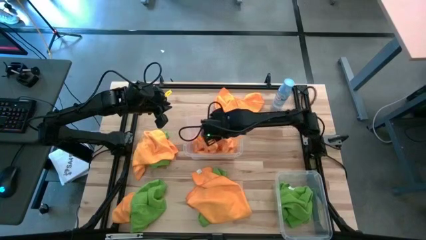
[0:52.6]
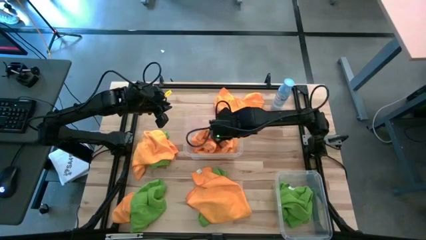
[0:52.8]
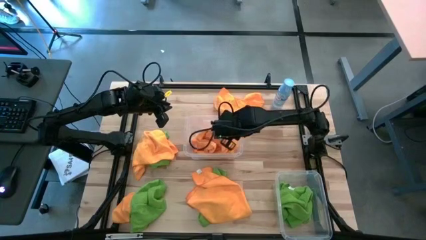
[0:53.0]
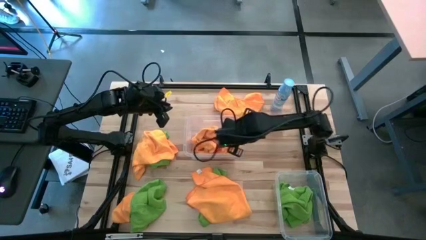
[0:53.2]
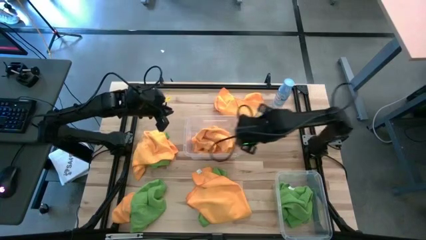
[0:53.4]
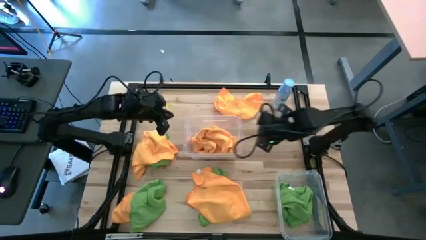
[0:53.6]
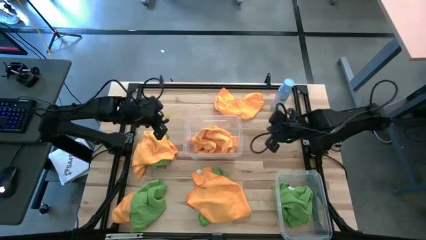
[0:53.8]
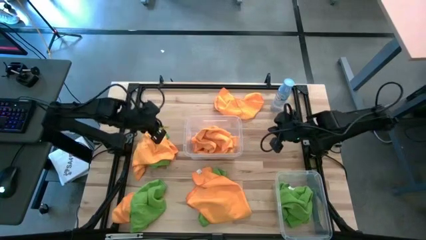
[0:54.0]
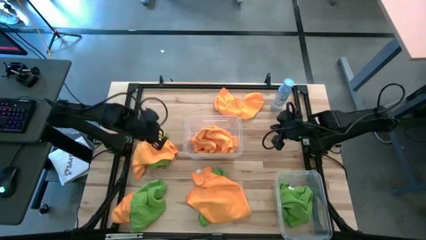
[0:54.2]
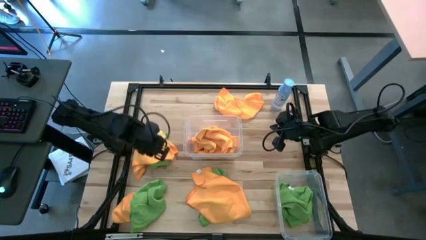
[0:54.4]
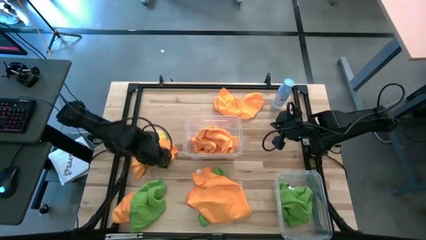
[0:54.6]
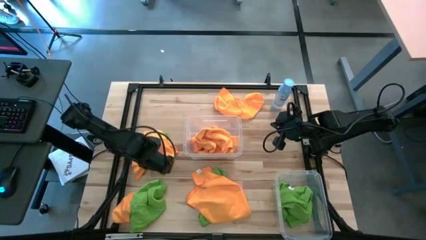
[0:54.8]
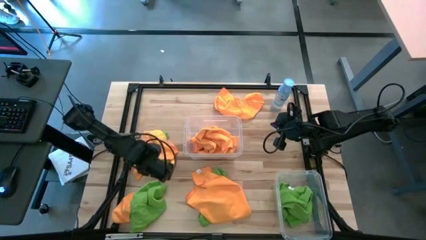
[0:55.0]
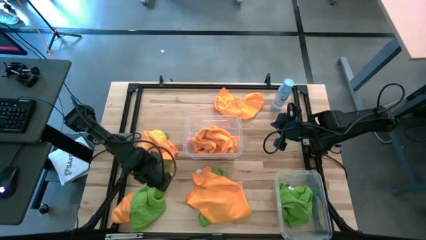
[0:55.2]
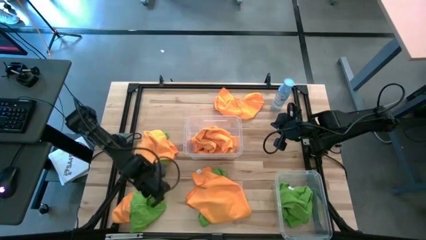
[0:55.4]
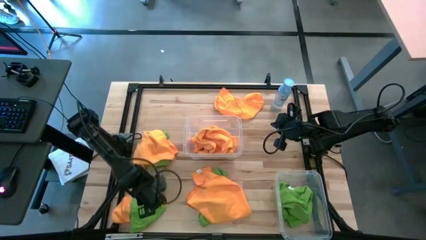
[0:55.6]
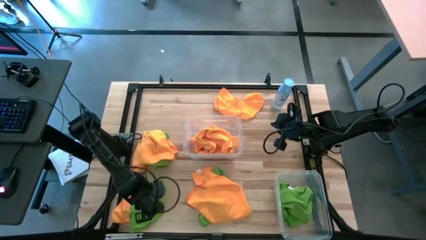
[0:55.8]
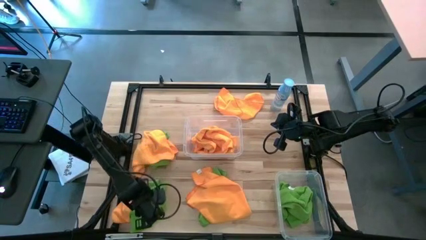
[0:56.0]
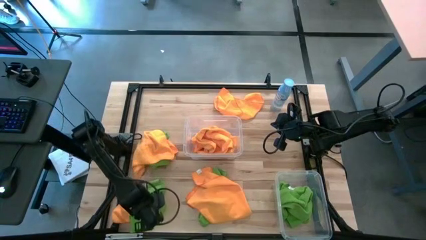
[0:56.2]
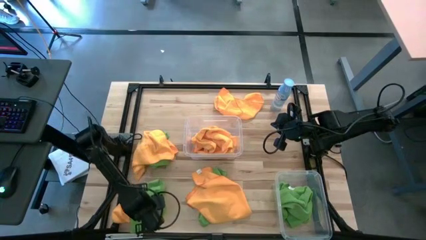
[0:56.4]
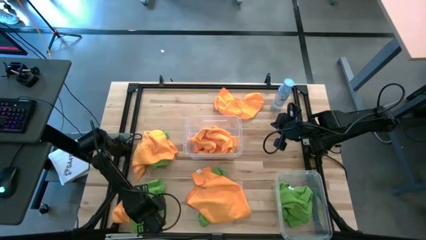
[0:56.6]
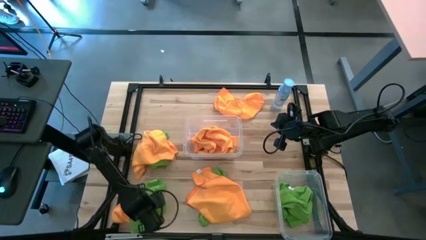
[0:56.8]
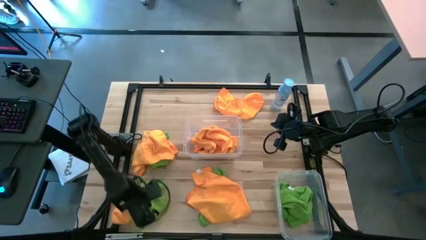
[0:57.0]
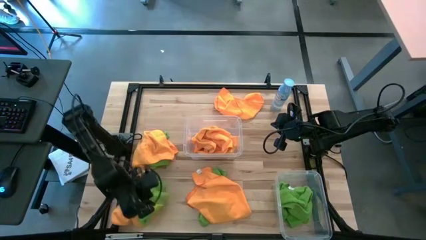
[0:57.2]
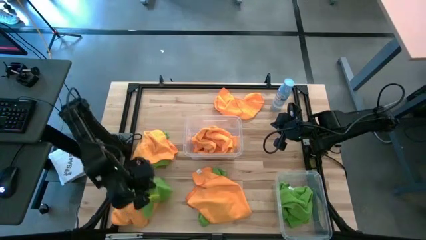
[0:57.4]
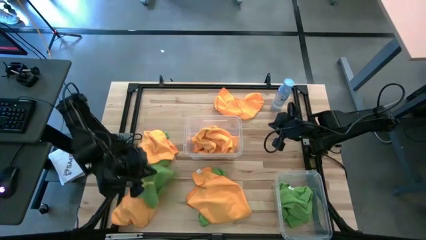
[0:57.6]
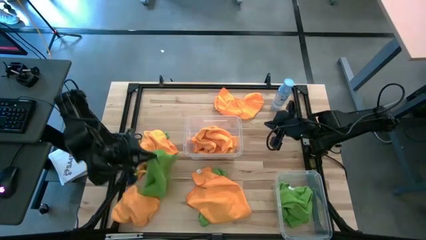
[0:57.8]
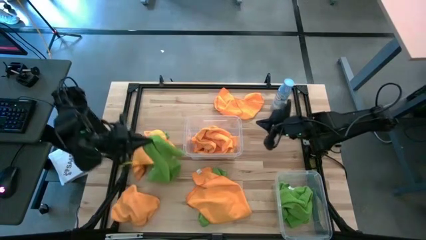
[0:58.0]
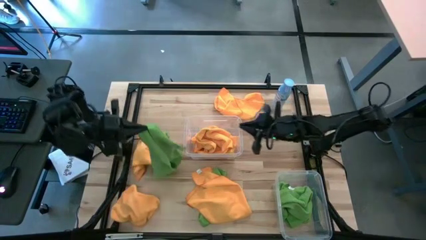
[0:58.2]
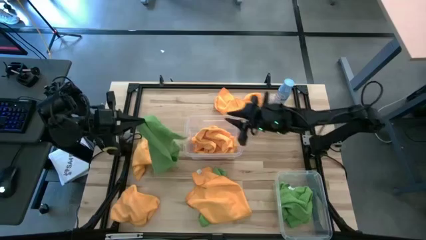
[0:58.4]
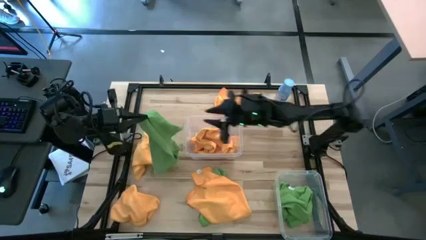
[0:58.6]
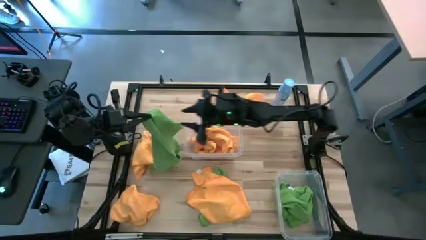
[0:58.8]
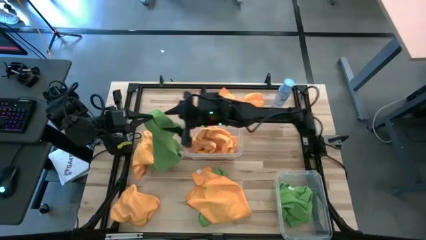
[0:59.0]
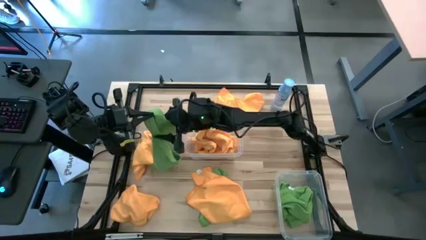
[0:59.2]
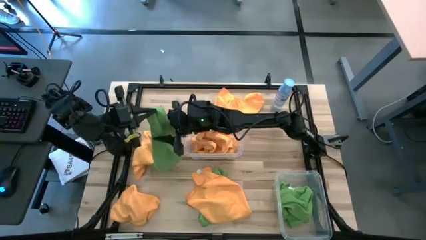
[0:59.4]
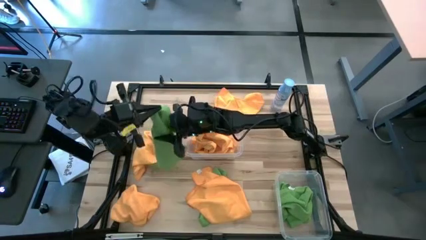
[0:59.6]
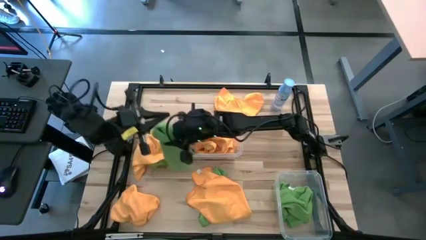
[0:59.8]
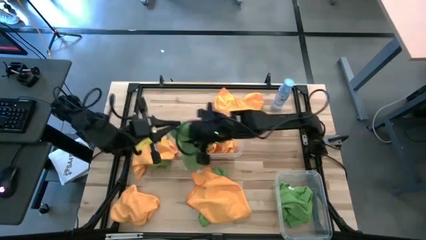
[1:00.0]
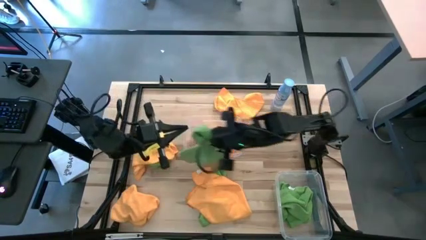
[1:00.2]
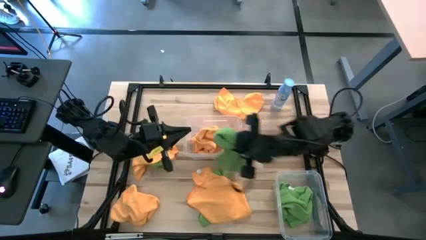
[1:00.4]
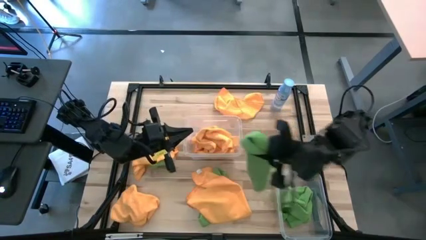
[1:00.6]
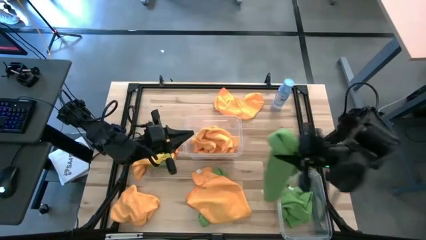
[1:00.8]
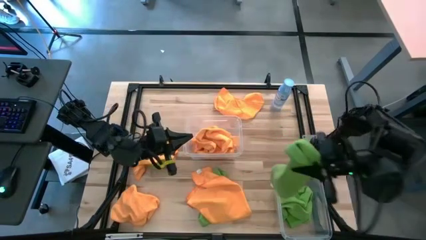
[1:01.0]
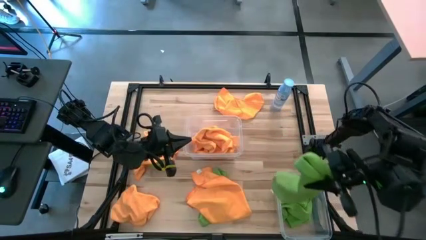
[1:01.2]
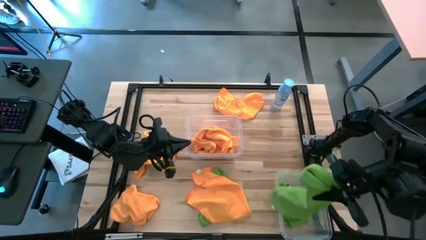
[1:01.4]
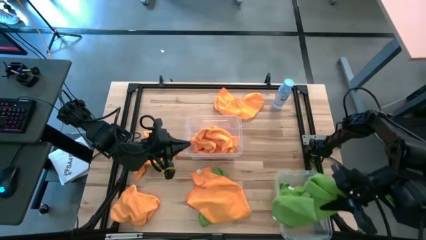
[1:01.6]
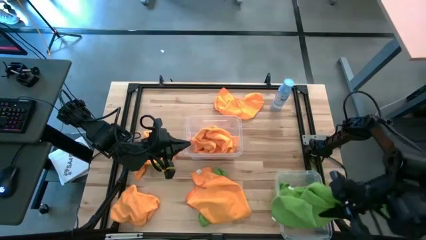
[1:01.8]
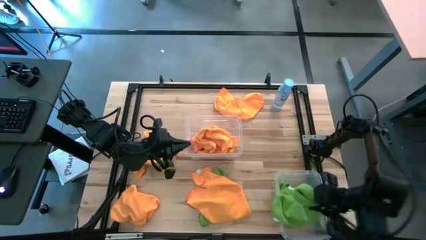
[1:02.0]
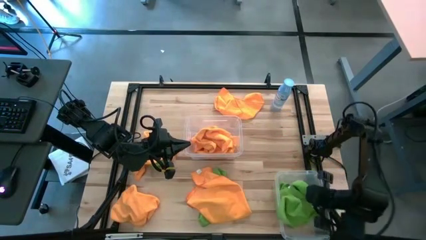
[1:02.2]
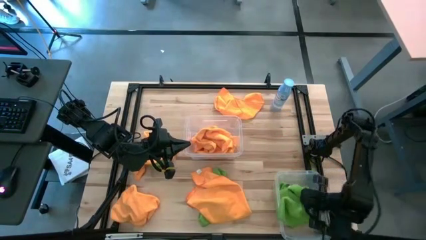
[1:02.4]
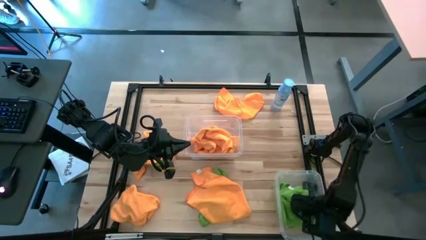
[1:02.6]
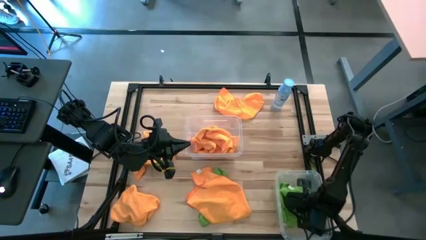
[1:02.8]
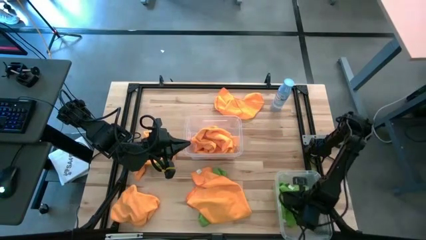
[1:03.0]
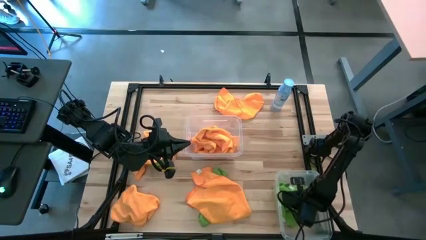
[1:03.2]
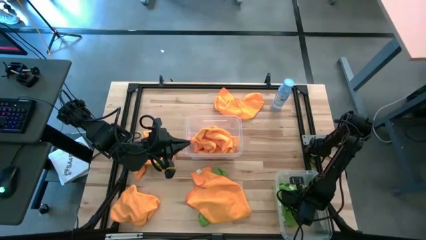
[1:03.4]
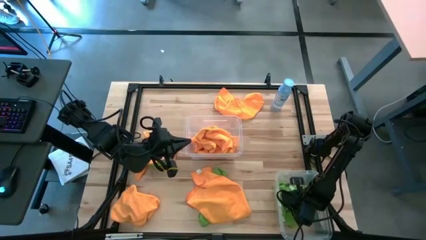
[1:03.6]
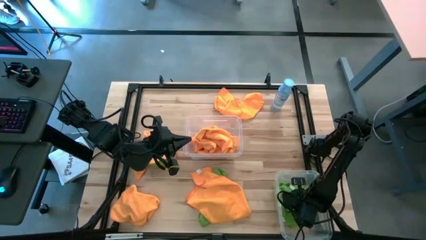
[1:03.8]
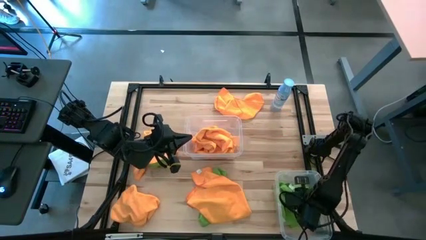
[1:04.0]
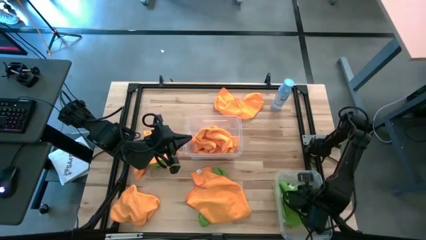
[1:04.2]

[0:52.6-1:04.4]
Task: Sort microfiber towel by color & place in baskets
Put the green microfiber cloth into the bottom transparent bin

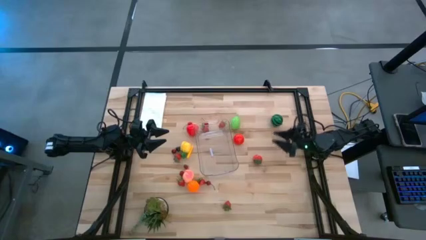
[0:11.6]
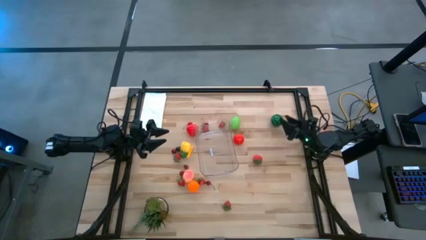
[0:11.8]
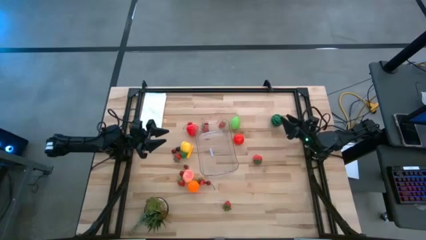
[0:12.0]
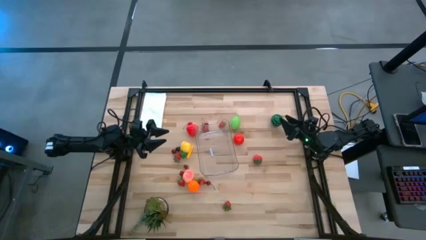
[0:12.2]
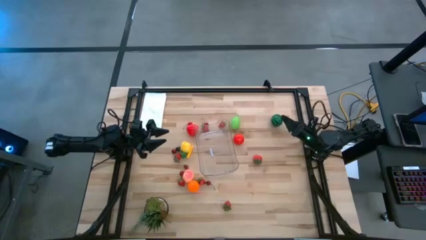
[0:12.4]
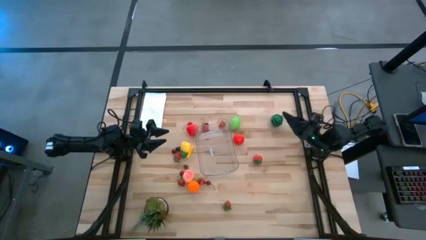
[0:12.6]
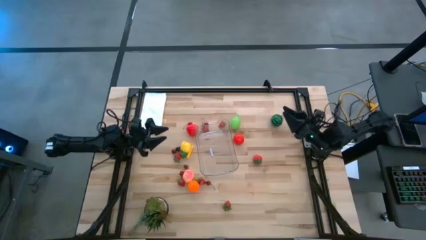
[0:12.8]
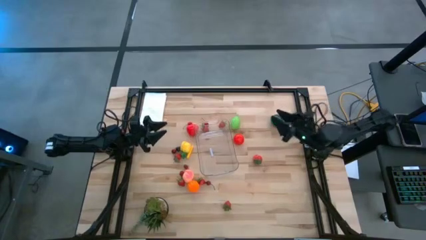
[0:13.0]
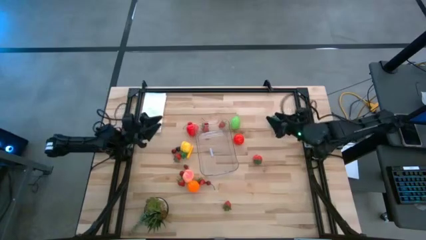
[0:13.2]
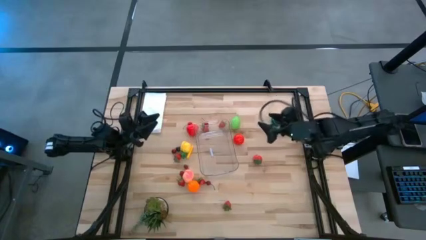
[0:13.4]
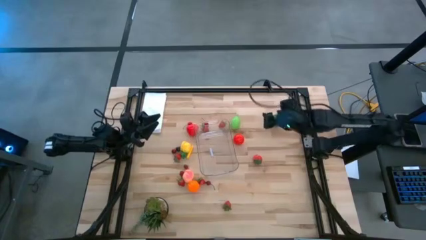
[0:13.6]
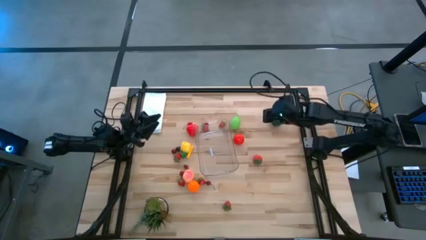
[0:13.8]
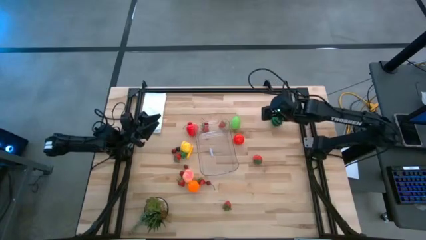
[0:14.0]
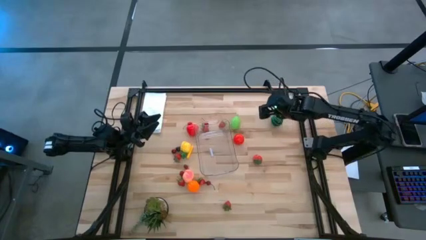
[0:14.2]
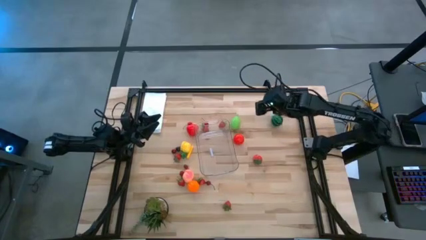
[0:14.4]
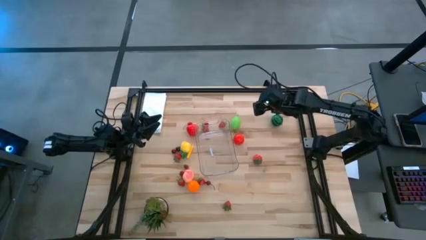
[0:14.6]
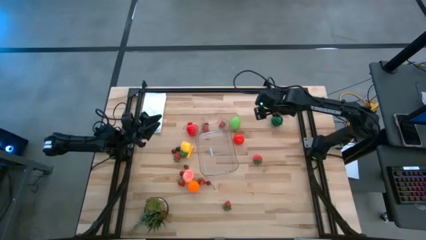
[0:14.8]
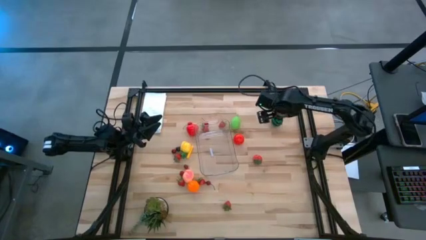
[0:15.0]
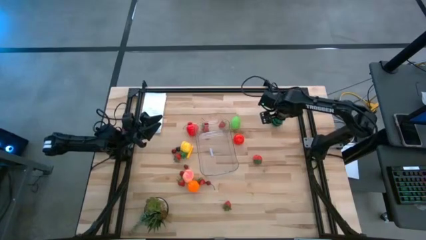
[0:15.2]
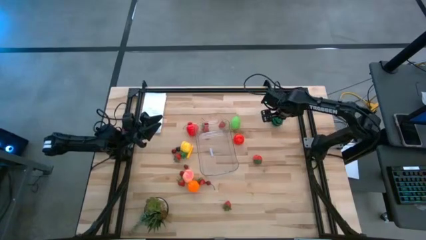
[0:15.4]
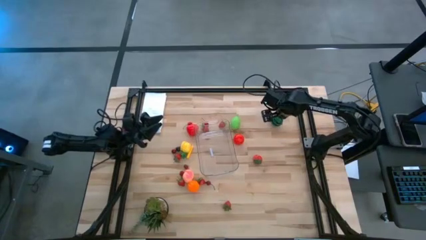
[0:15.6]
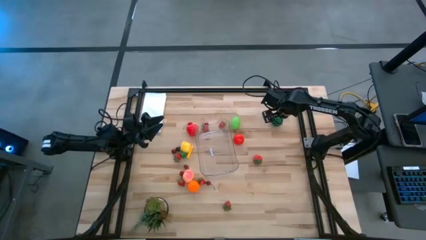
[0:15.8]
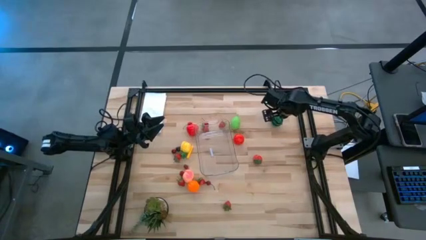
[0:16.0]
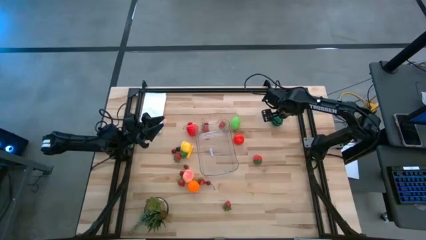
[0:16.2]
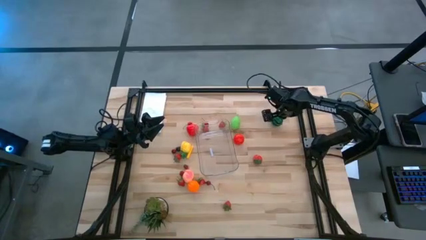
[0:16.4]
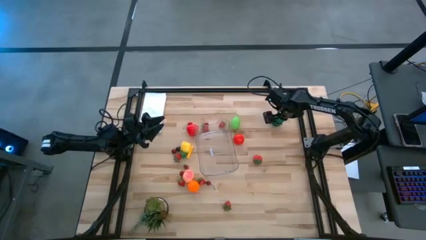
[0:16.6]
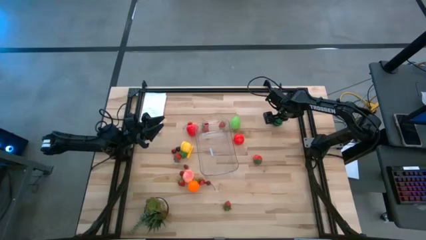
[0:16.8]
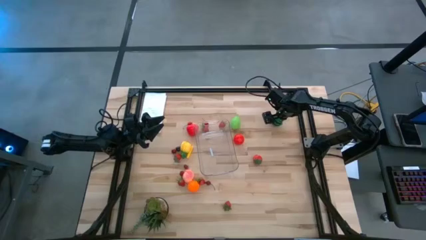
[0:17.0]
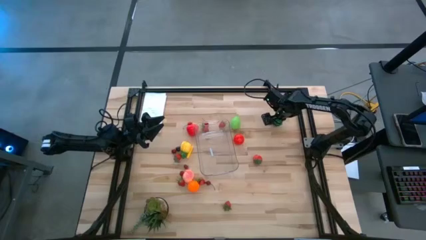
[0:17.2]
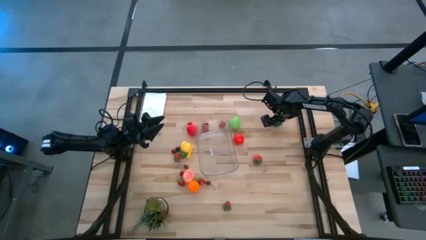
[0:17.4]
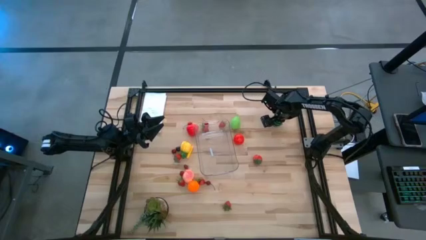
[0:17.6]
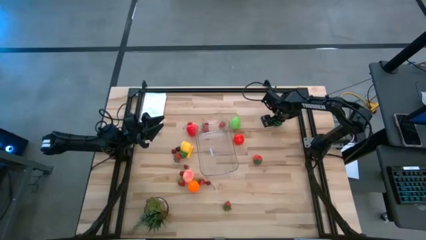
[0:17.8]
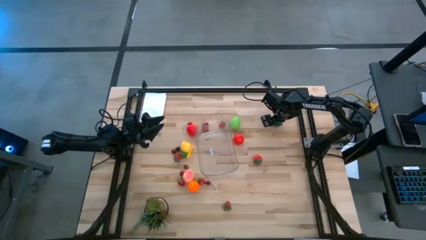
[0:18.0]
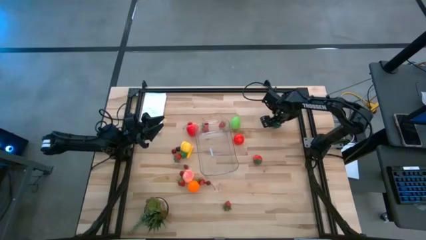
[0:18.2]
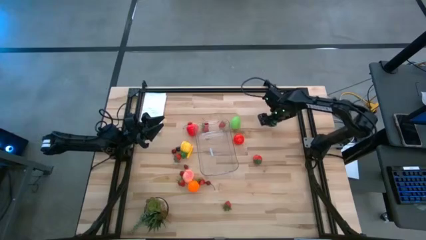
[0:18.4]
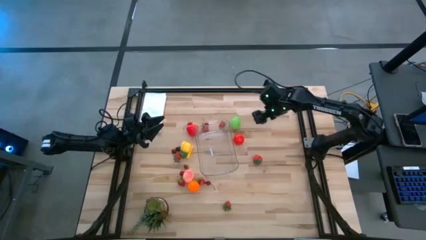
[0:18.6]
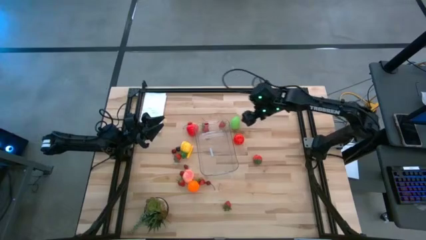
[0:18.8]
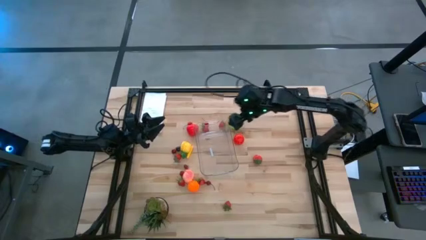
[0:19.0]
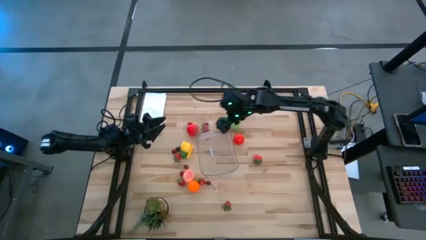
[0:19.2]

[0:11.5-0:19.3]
Task: Pick and placing Produce into tupperware
Put the watermelon into the transparent bin
